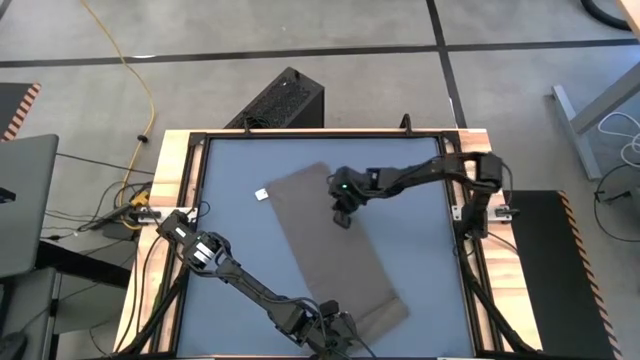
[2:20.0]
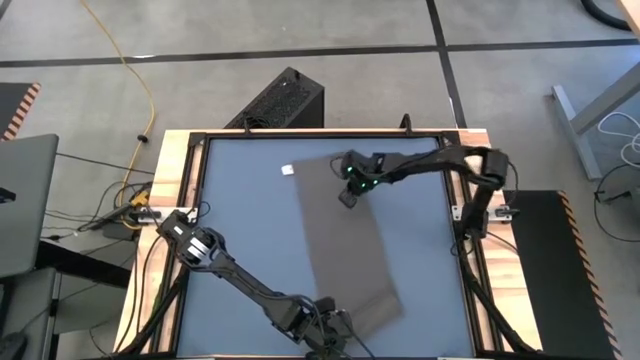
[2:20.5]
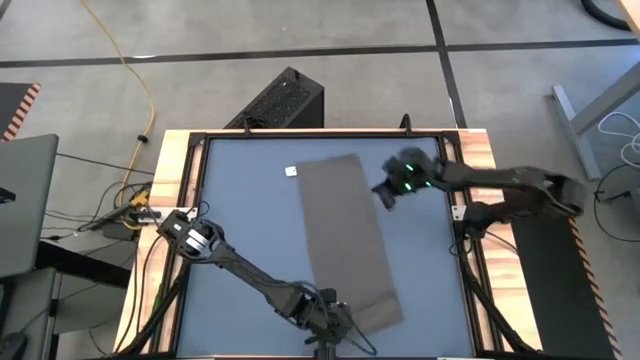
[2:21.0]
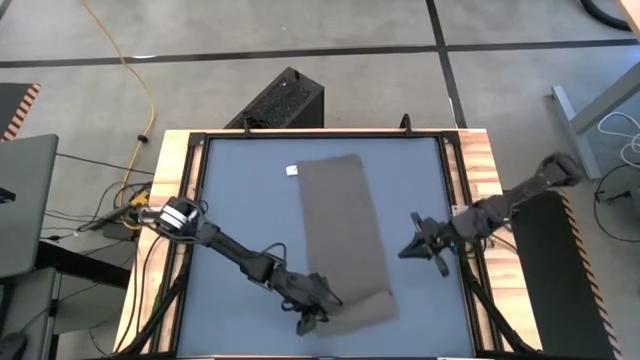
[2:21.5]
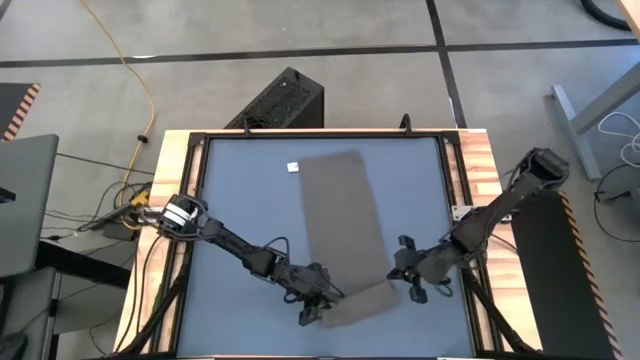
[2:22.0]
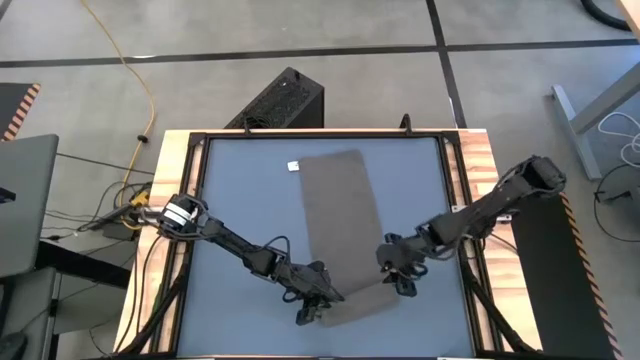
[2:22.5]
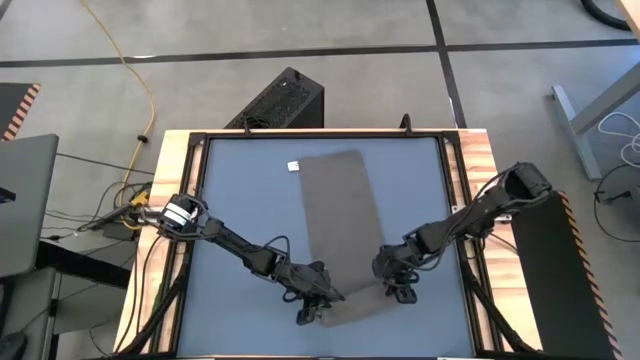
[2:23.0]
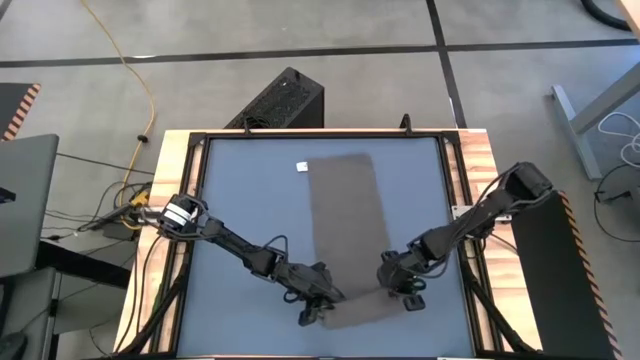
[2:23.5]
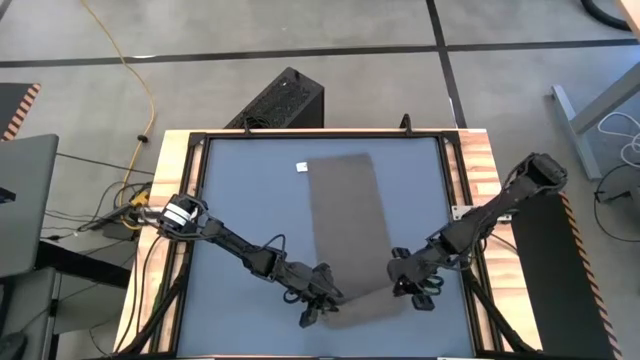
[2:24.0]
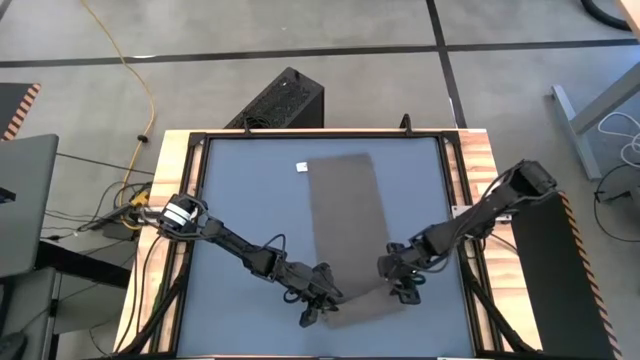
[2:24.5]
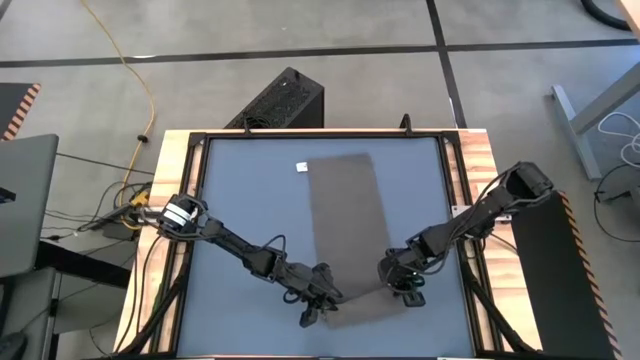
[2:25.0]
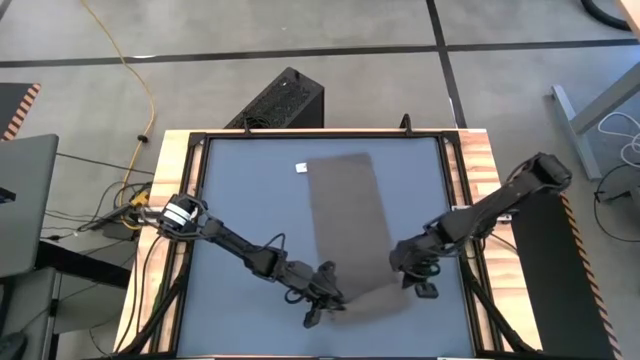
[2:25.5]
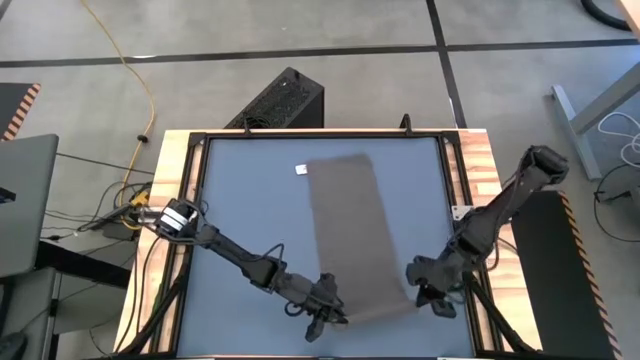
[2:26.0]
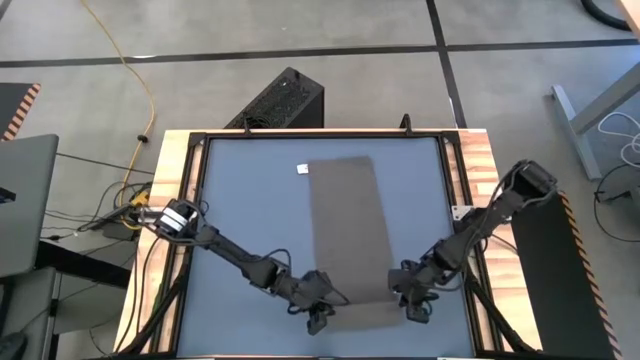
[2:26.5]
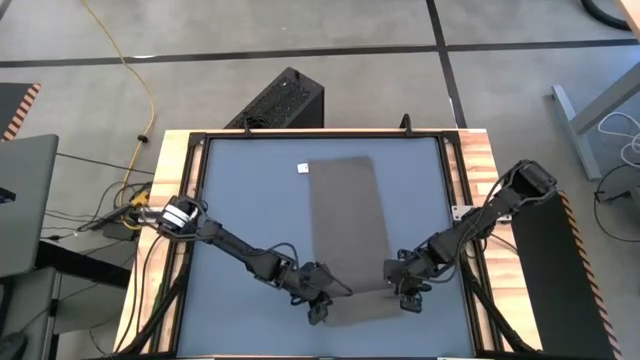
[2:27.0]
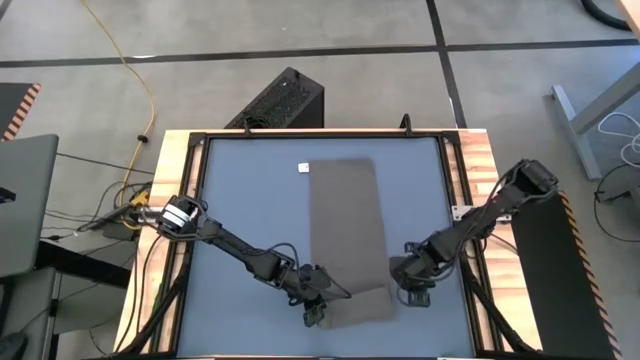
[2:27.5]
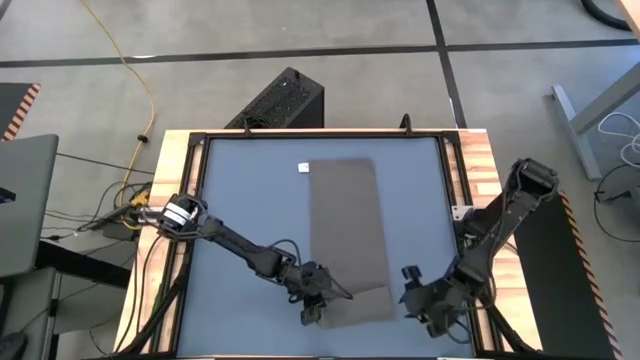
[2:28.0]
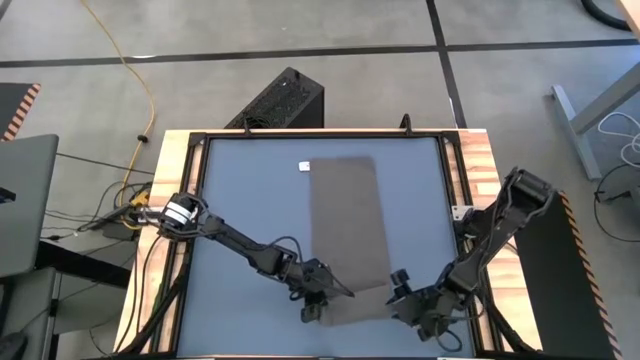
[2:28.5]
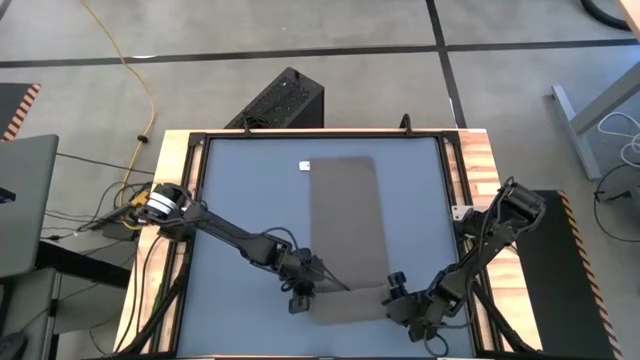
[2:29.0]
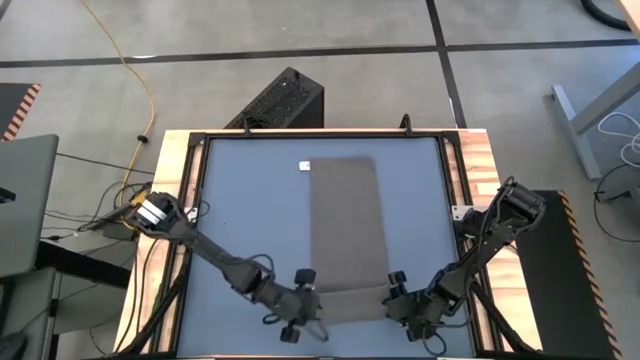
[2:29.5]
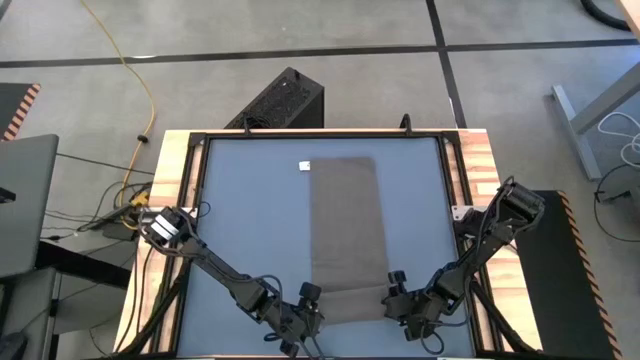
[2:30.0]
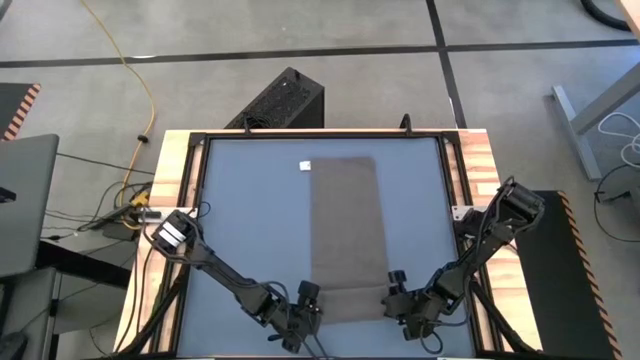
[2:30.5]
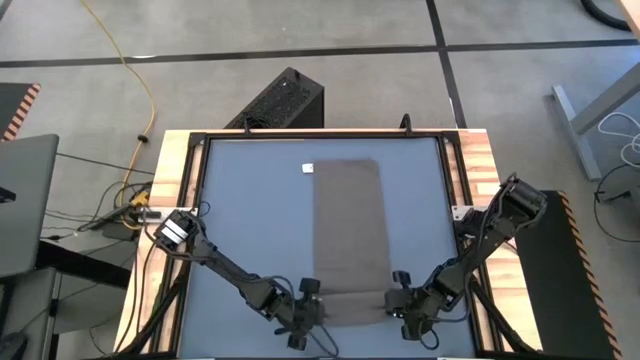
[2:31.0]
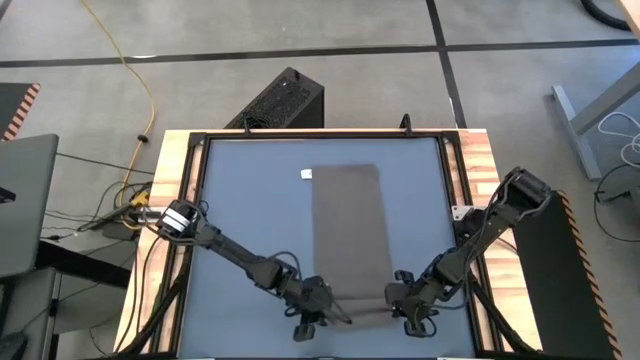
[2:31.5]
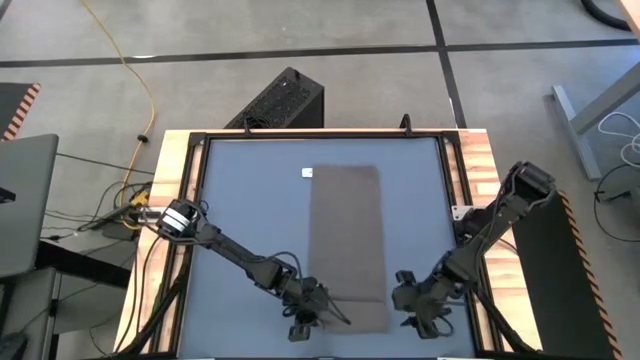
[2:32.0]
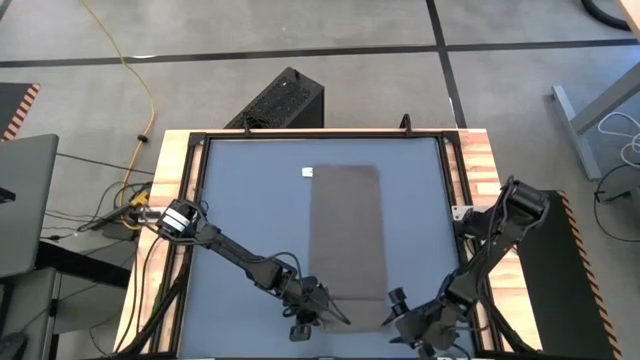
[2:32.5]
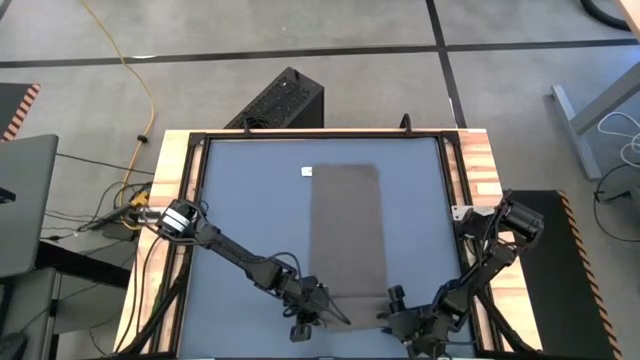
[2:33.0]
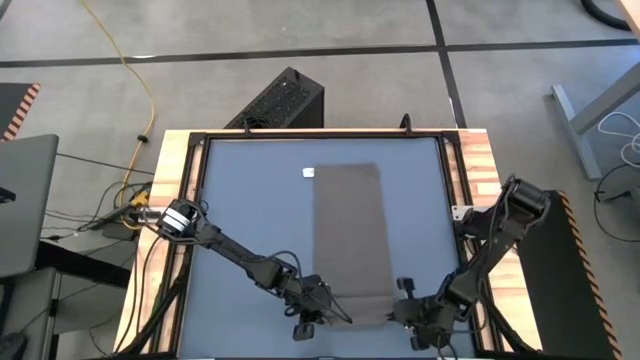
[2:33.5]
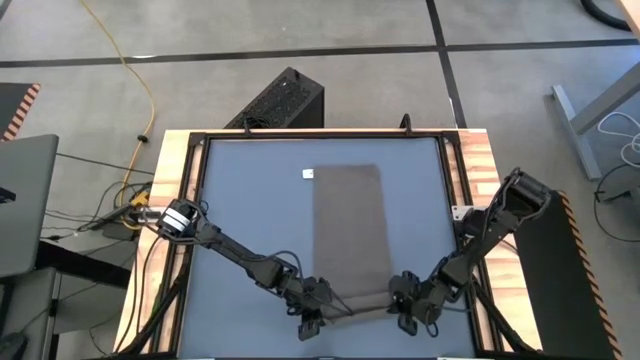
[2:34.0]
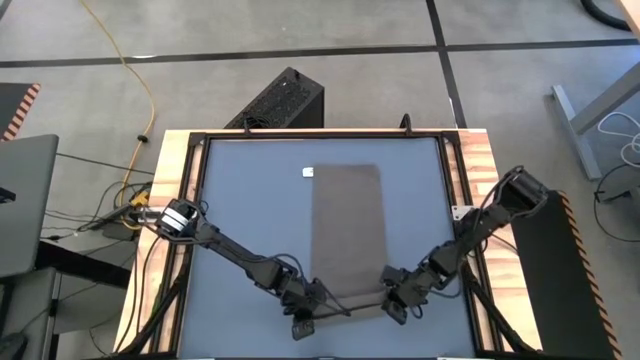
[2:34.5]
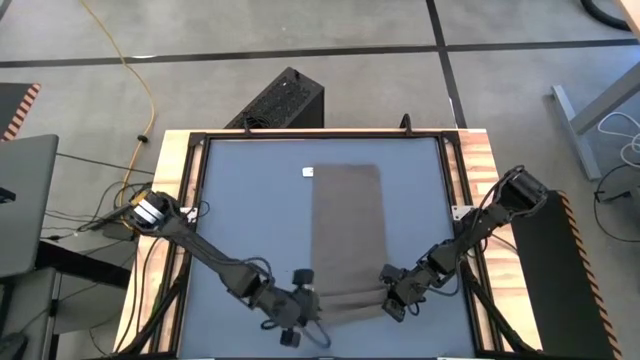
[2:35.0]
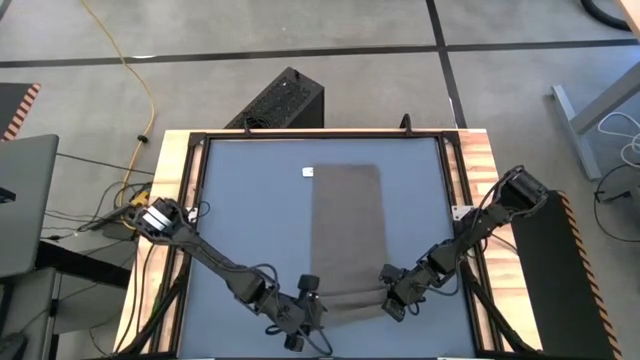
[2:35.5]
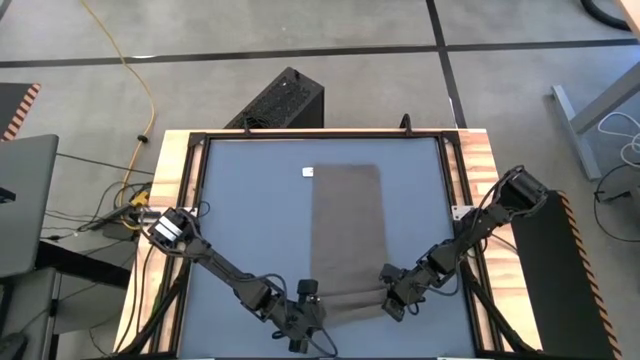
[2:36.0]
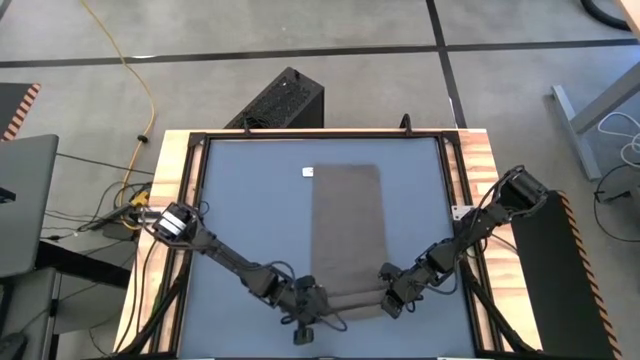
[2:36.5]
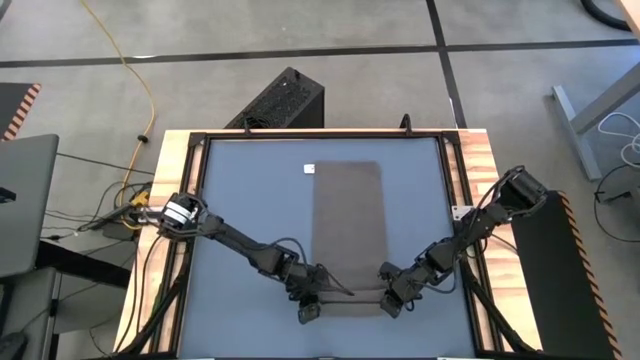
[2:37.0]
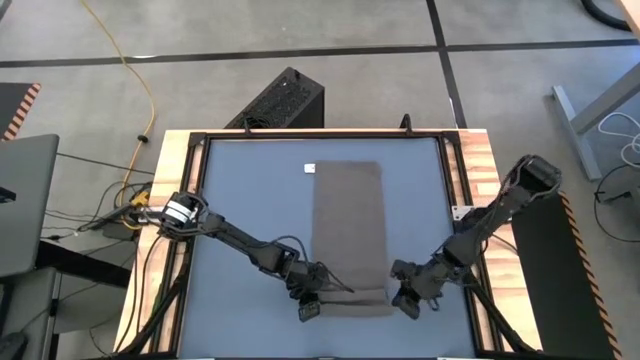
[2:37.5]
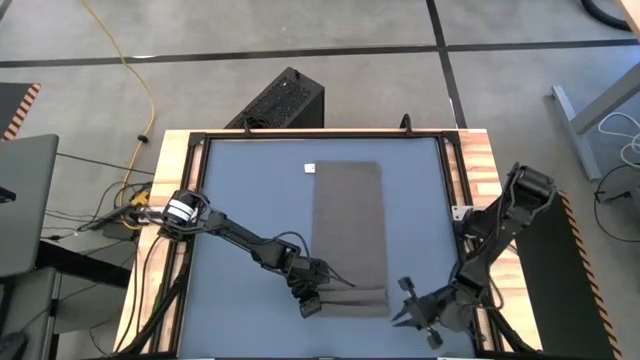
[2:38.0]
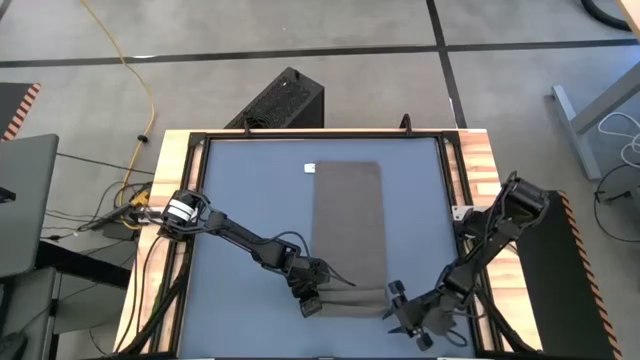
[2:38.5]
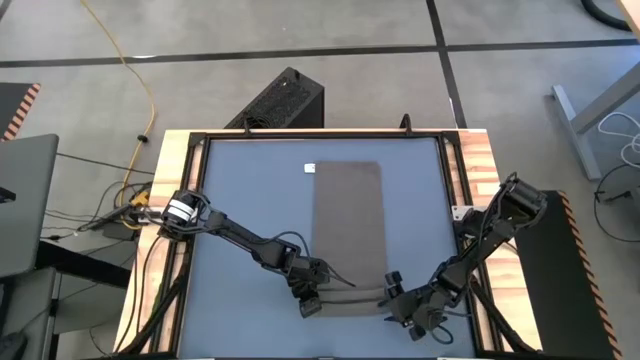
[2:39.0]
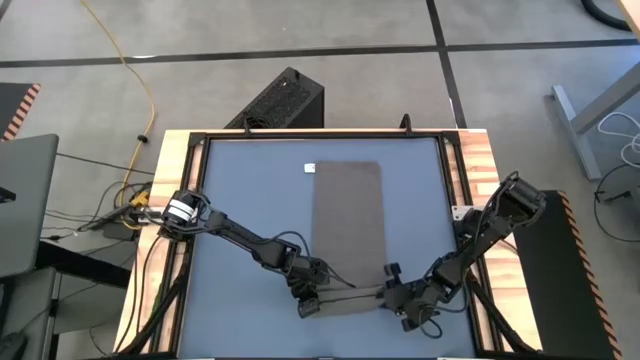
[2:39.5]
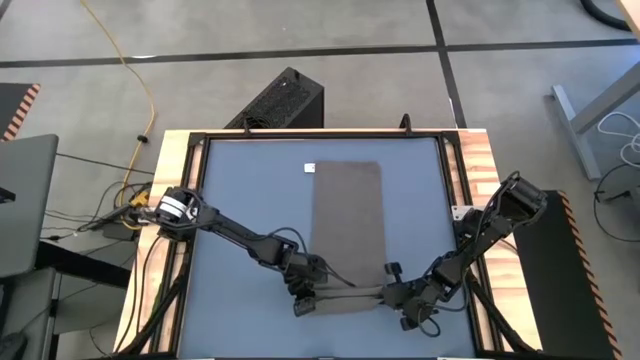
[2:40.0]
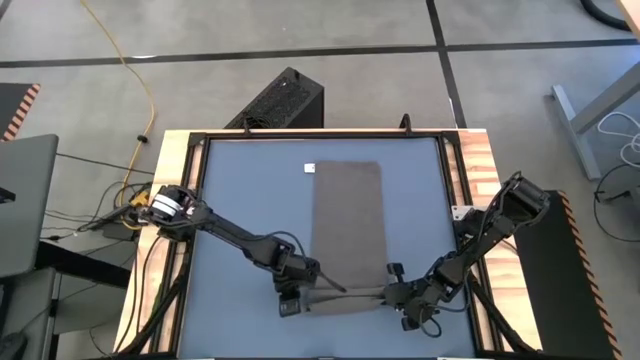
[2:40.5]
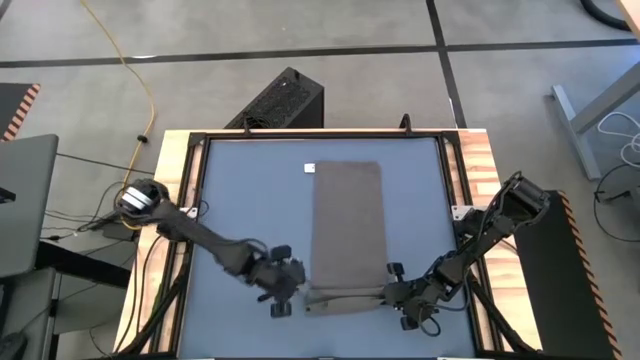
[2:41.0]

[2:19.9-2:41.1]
Task: Roll towel into tight, uniform cylinder
Roll the gray towel

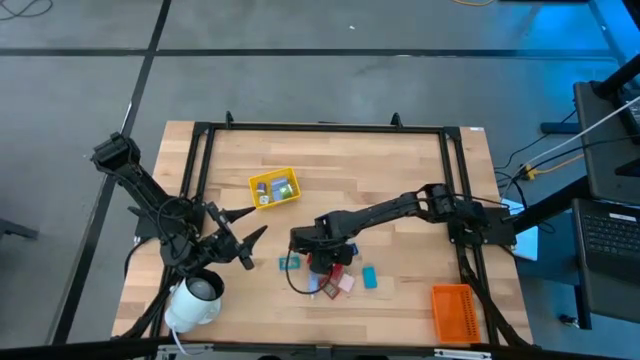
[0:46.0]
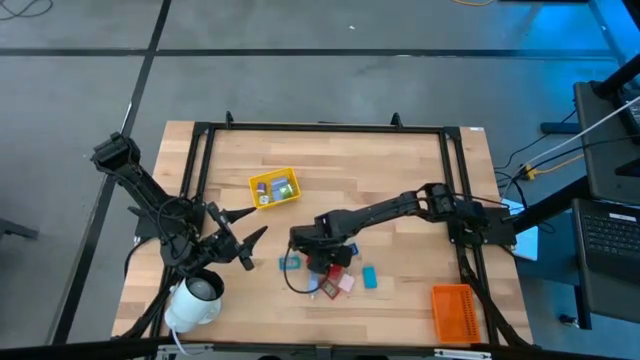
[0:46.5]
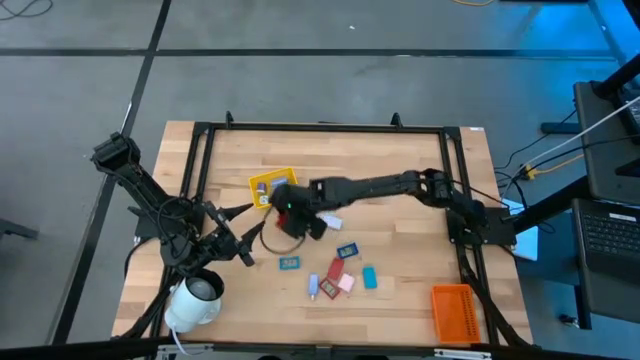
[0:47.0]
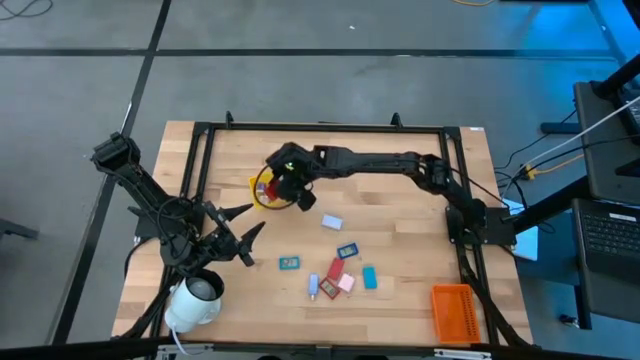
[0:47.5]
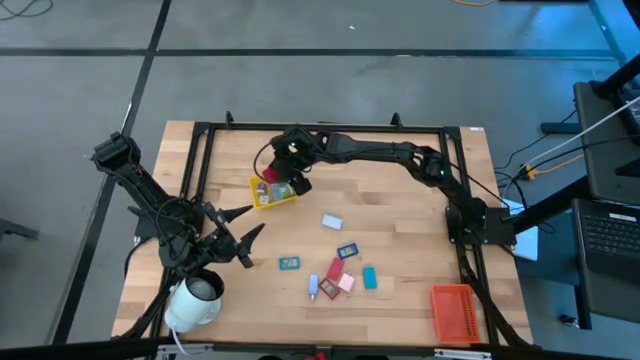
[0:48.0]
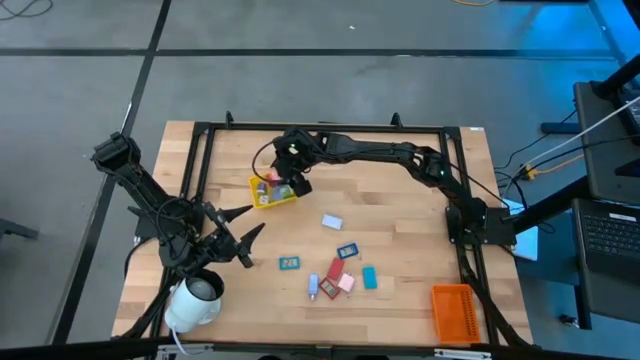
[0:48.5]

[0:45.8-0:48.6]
Task: Pick & Place Office items
Put the red charger adapter into the yellow bin
